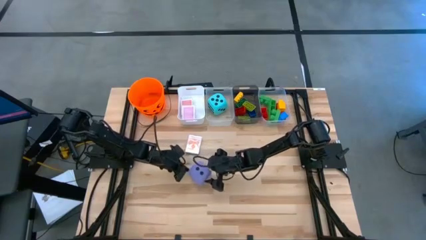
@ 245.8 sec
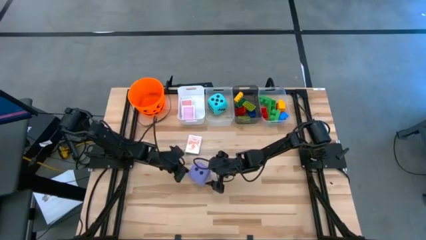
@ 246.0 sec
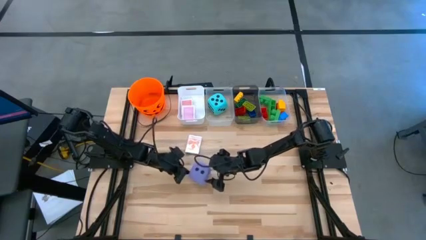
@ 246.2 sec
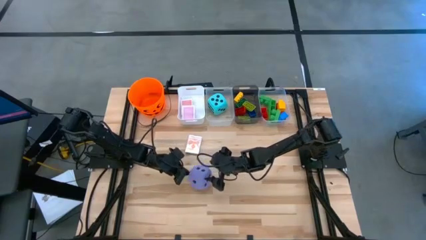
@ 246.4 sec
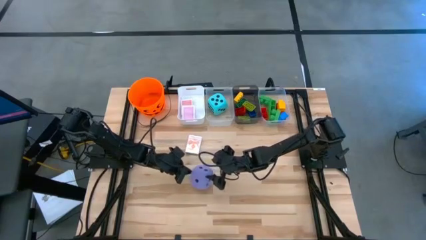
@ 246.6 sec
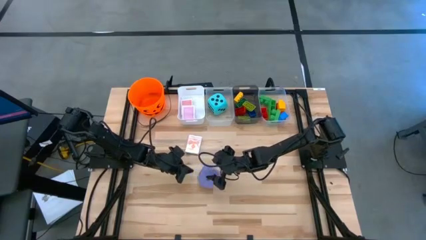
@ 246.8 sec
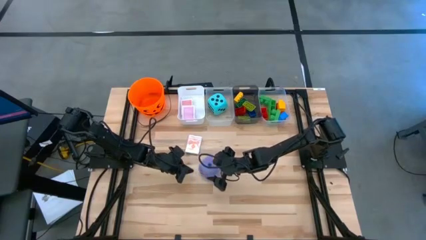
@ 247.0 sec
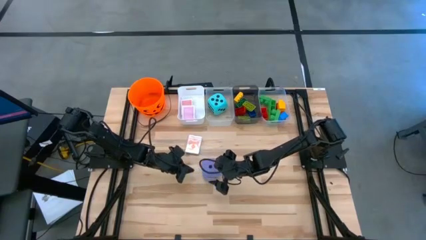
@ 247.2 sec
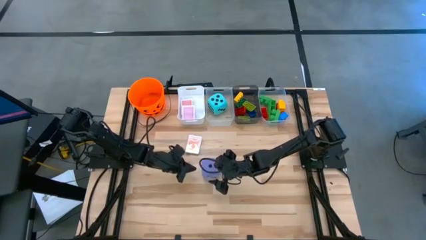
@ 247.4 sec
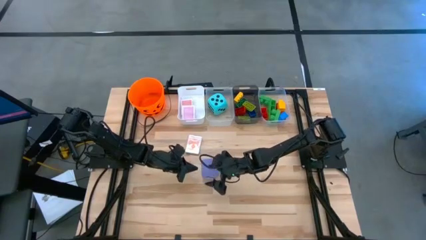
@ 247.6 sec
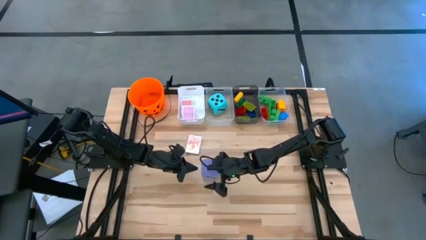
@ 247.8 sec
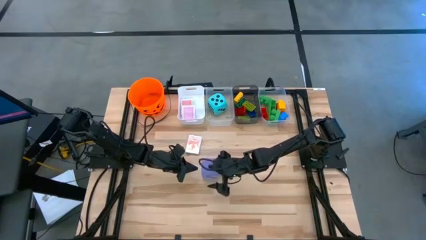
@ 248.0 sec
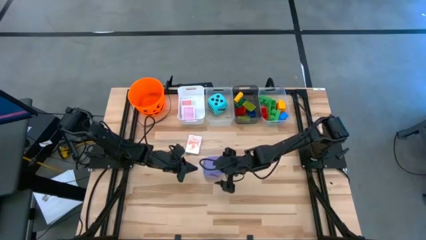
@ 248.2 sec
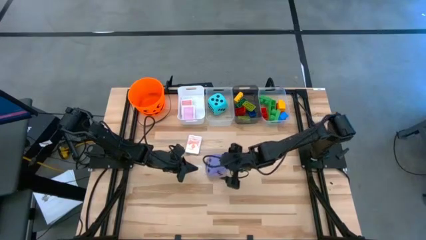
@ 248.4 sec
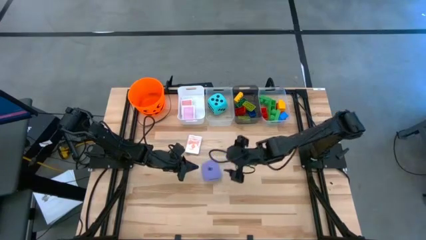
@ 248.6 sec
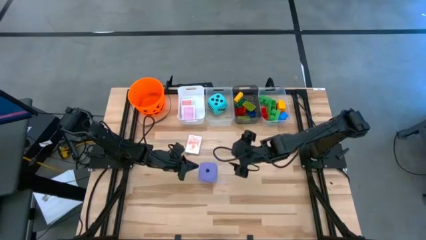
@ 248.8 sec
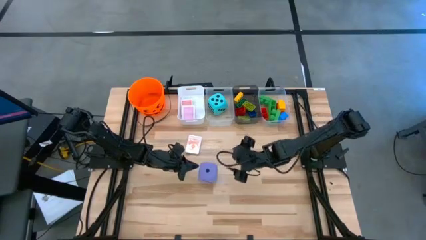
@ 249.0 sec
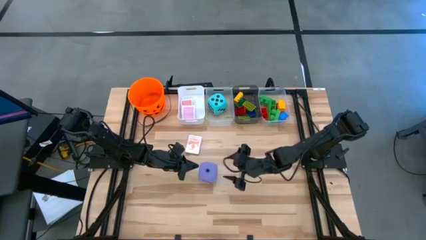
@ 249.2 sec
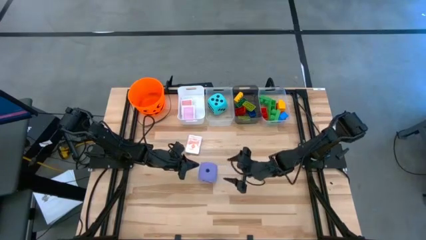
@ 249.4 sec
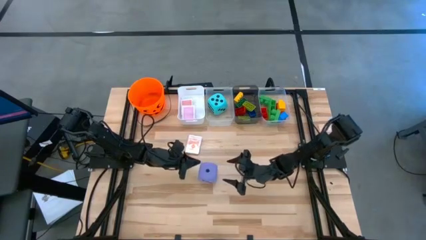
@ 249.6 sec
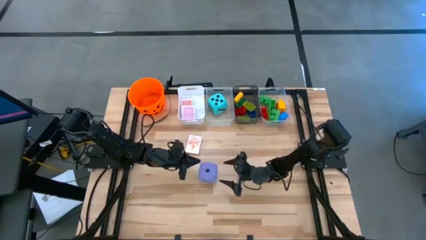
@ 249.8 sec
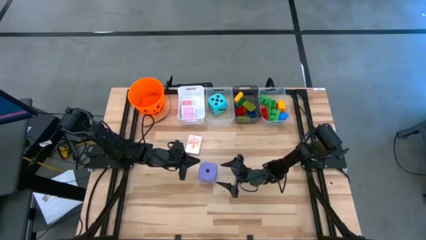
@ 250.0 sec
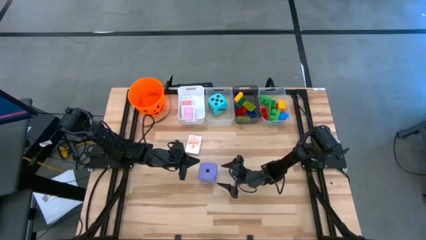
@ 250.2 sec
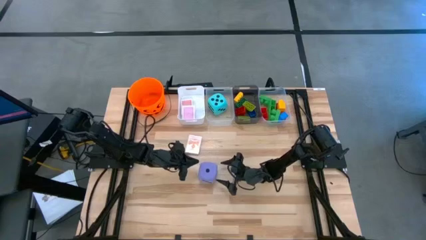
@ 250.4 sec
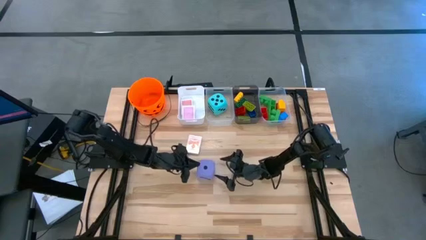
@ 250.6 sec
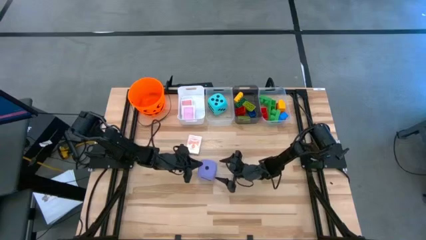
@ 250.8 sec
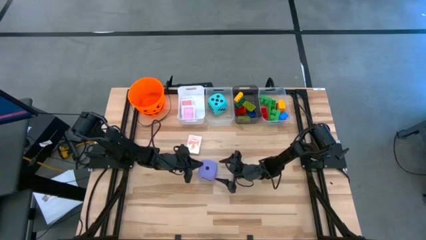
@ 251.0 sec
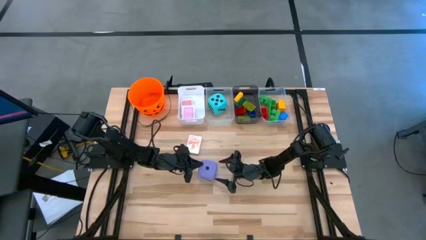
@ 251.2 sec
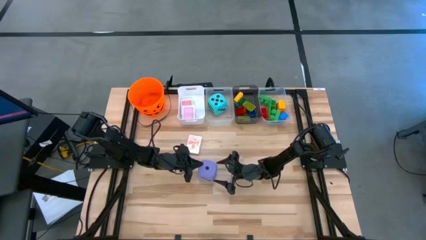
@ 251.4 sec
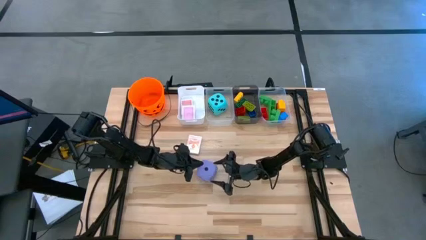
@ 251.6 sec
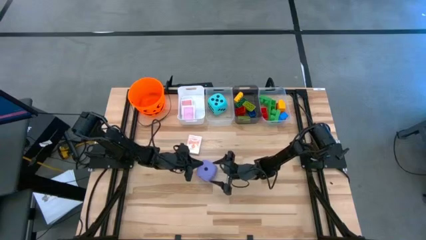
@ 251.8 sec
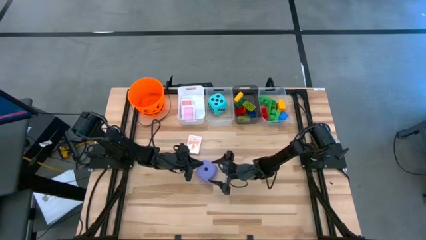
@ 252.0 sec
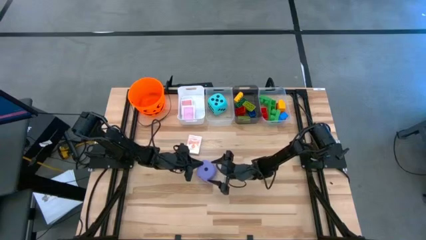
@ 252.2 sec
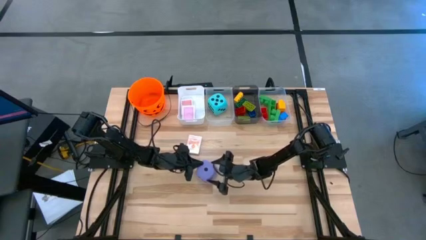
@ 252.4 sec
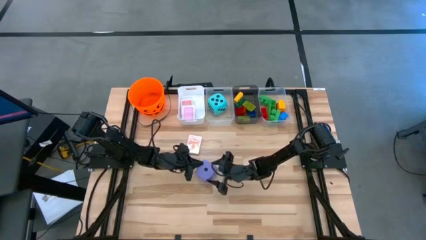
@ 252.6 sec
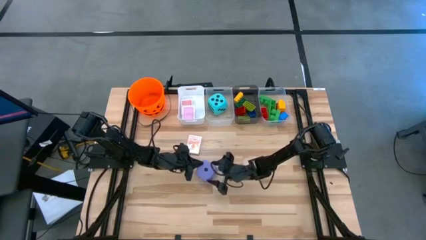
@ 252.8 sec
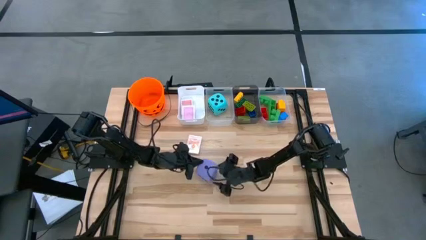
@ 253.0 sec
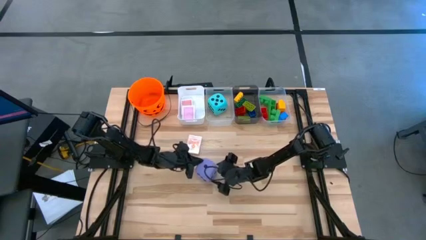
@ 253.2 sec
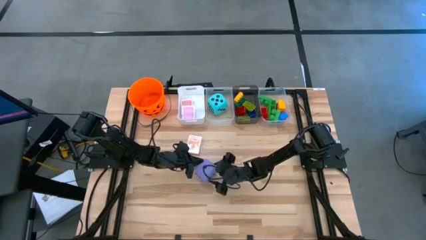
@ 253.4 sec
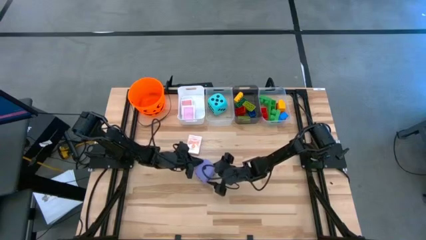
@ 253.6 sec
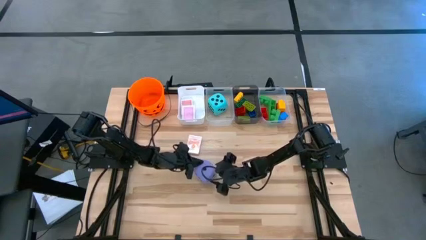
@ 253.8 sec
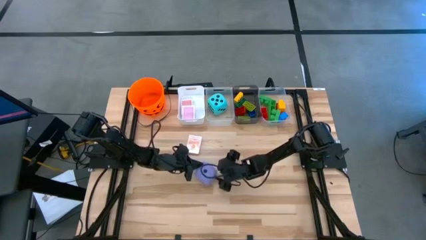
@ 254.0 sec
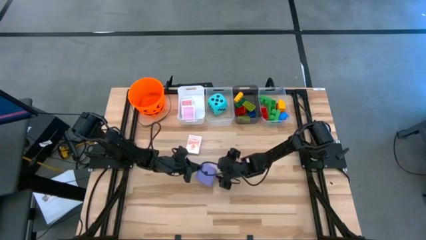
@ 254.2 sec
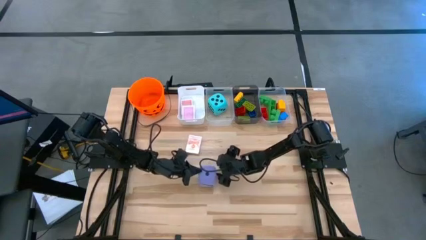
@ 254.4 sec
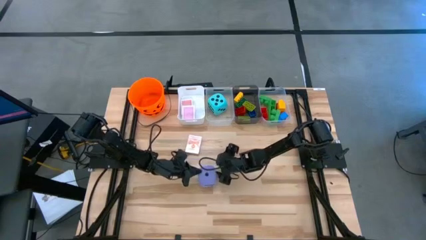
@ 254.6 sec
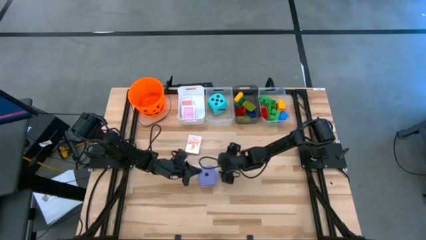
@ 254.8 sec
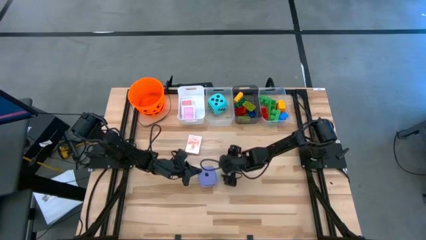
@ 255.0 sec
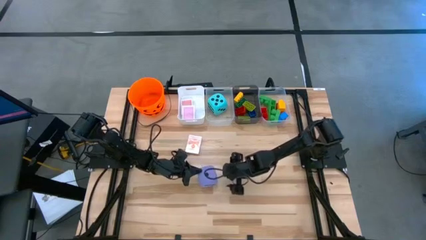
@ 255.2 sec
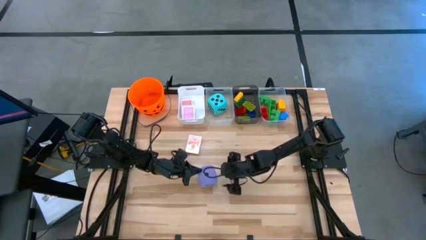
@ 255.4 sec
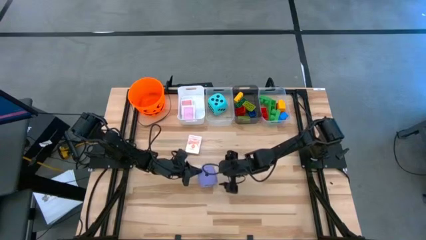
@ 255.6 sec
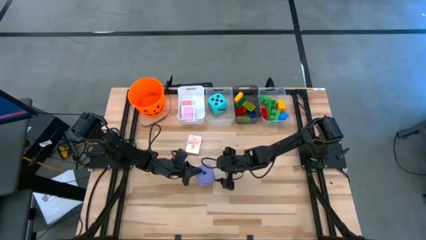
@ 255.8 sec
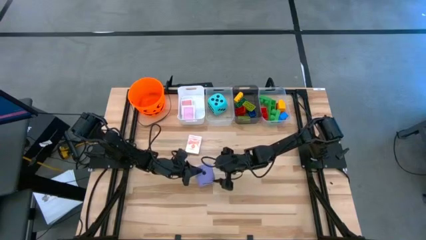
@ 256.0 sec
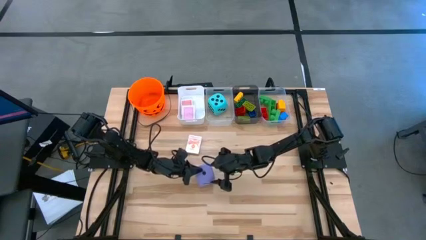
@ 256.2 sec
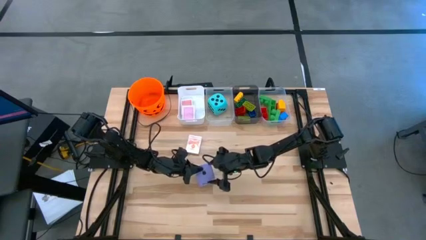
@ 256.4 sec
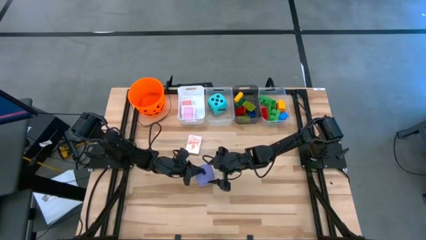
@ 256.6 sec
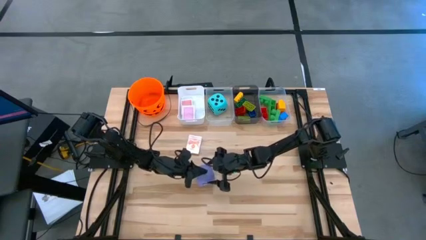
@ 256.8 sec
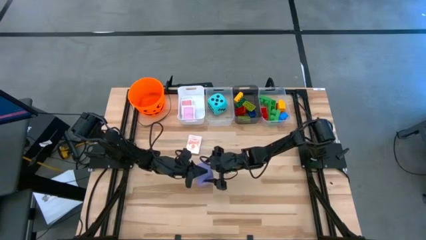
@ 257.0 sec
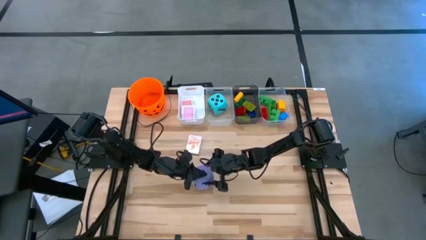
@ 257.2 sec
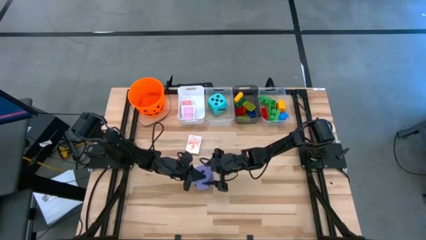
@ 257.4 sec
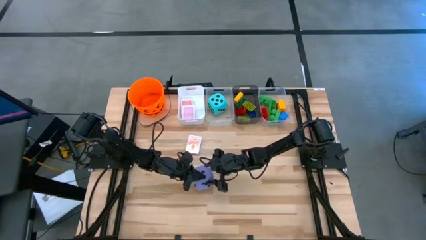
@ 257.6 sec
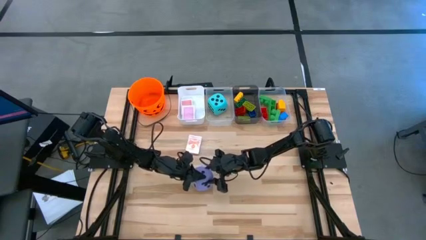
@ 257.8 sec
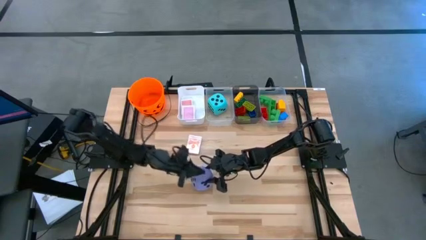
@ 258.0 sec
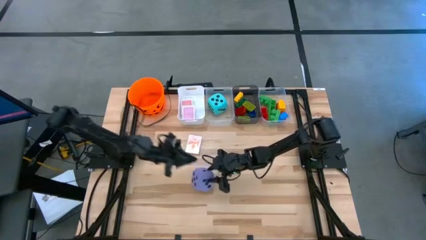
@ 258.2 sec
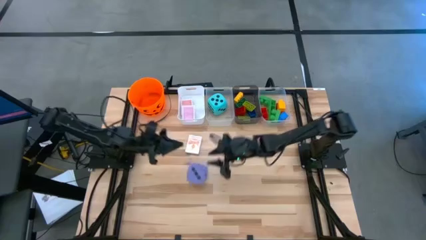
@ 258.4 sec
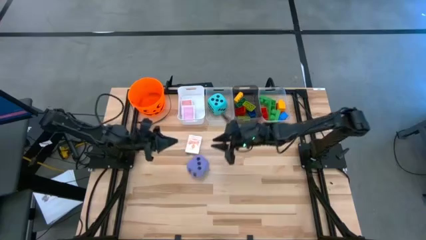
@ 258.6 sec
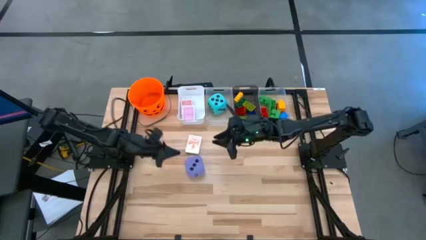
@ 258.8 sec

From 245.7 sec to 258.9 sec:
Task: Pick & Place Toys
Put the violet dice into the left transparent bin
